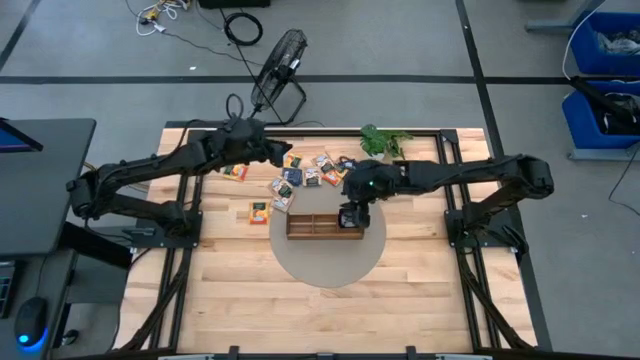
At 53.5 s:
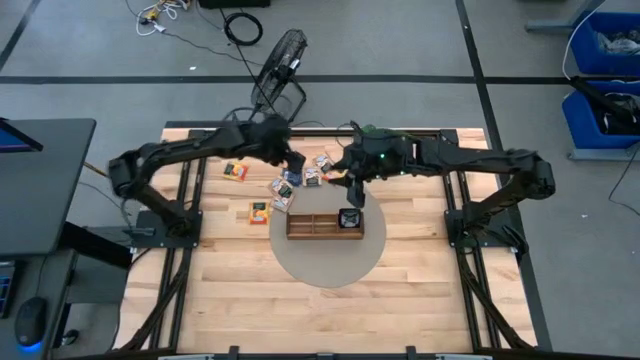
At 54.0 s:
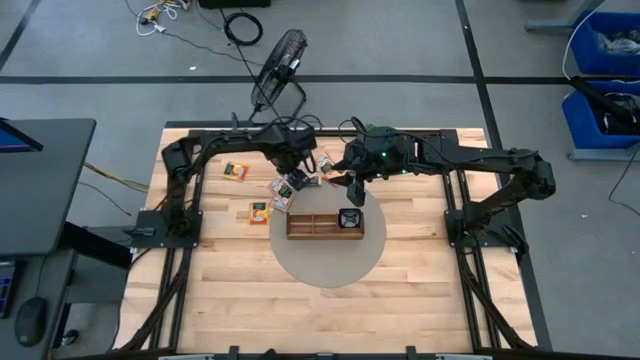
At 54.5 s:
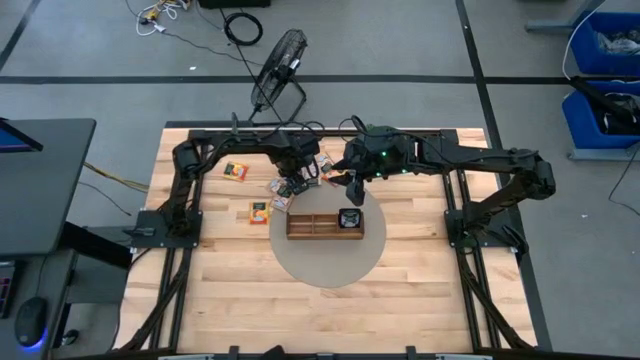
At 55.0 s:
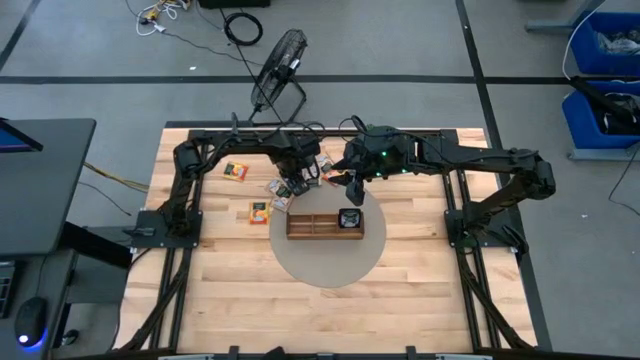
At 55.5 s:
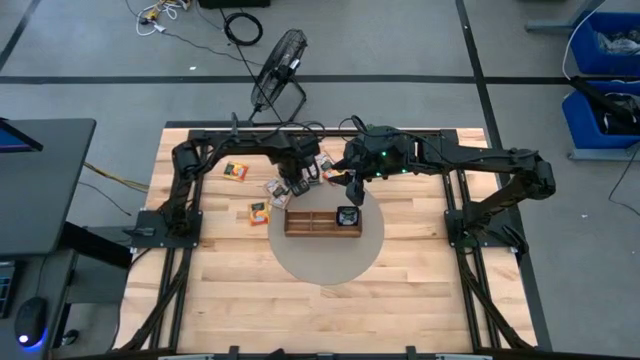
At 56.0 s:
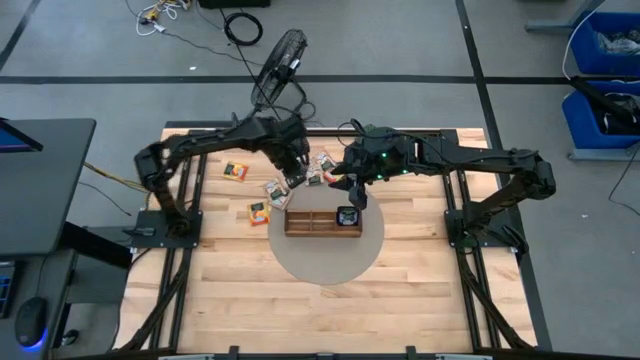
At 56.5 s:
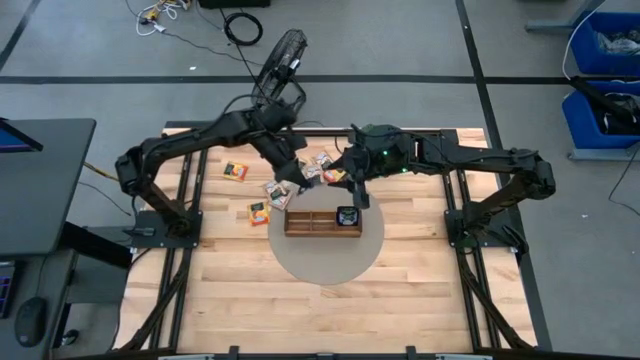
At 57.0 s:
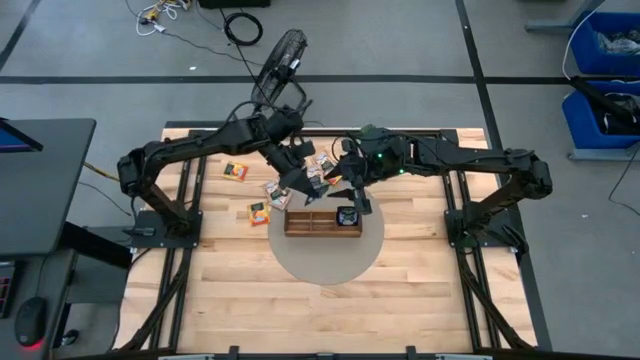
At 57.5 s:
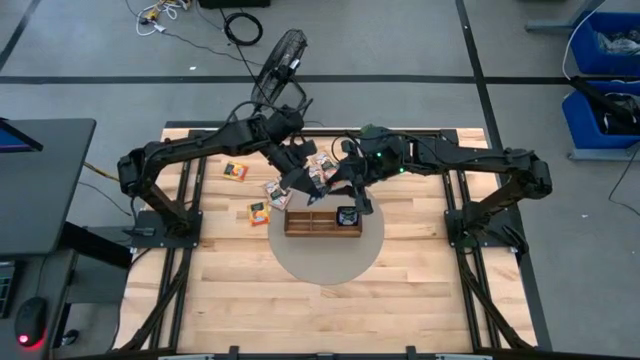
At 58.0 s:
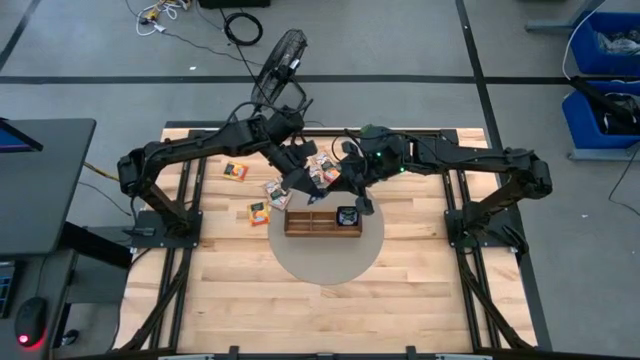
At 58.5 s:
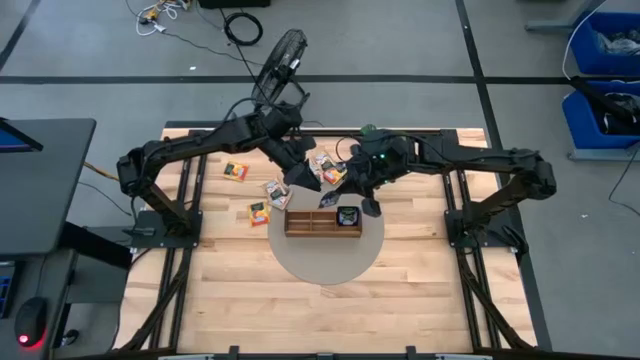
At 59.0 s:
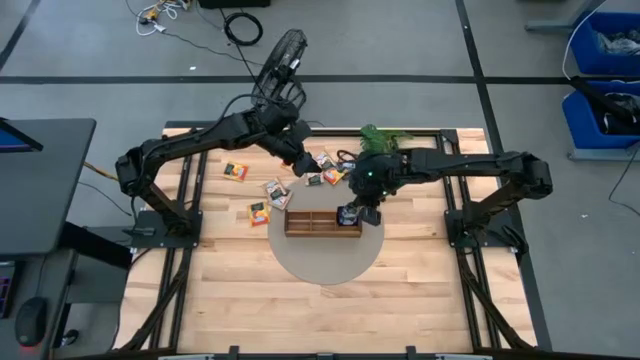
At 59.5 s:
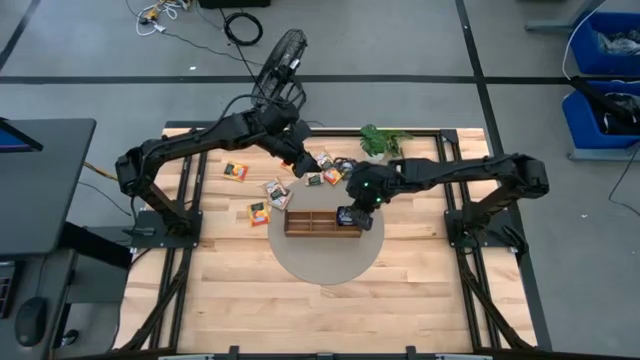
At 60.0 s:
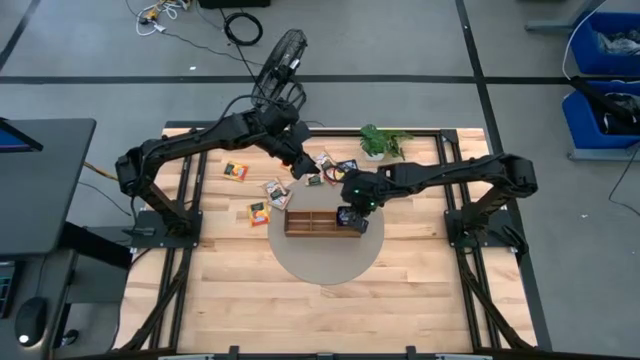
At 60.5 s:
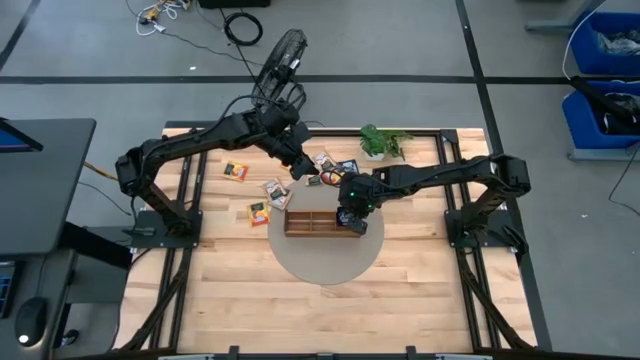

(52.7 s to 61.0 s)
Task: Pick & Place Tea
Put the blue tea bag into the right section of the wooden organizer

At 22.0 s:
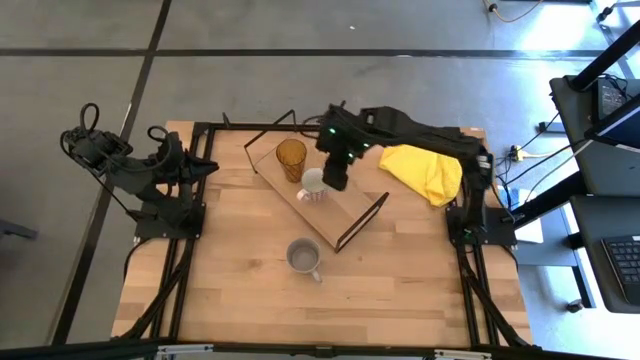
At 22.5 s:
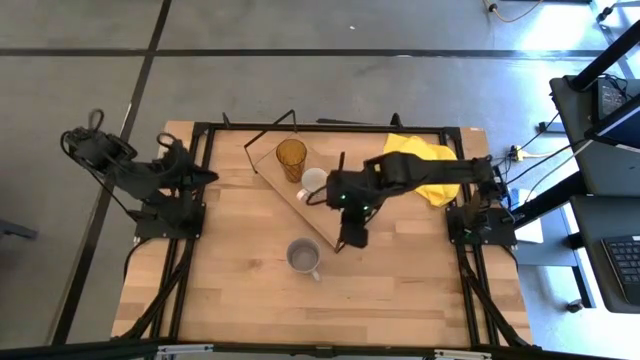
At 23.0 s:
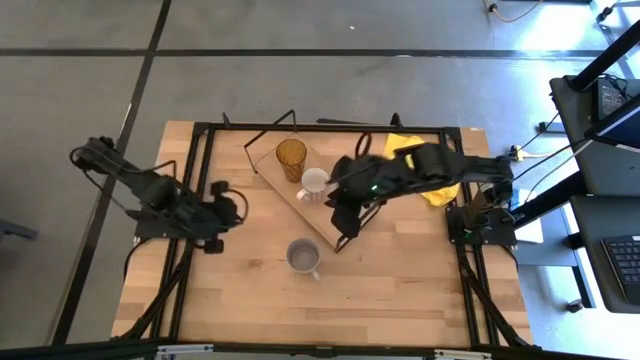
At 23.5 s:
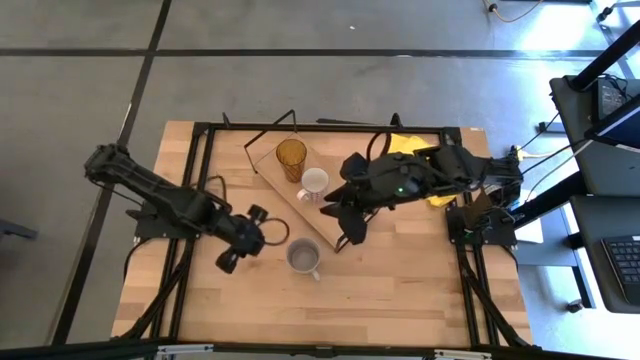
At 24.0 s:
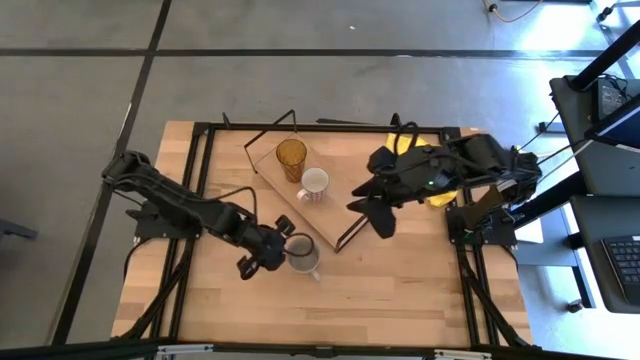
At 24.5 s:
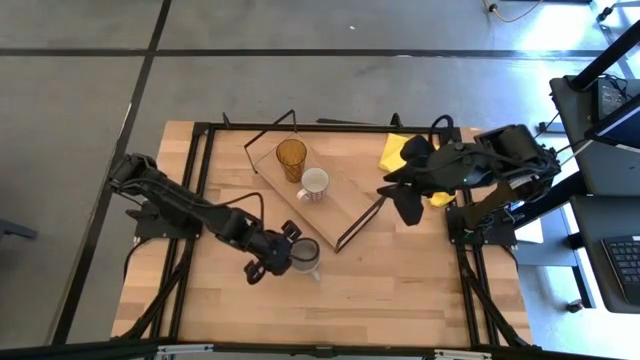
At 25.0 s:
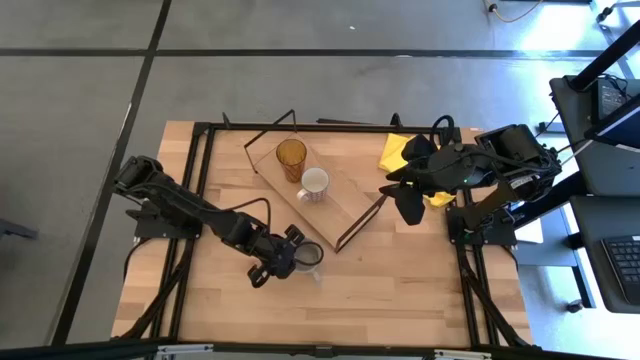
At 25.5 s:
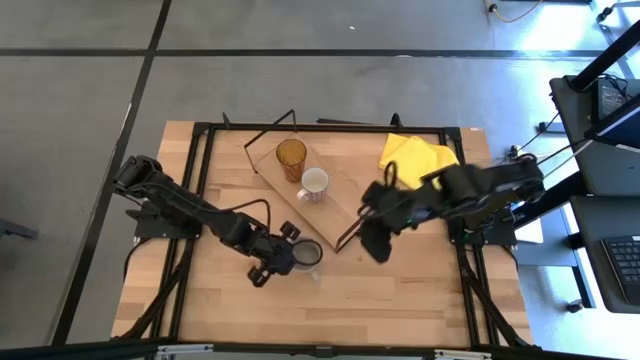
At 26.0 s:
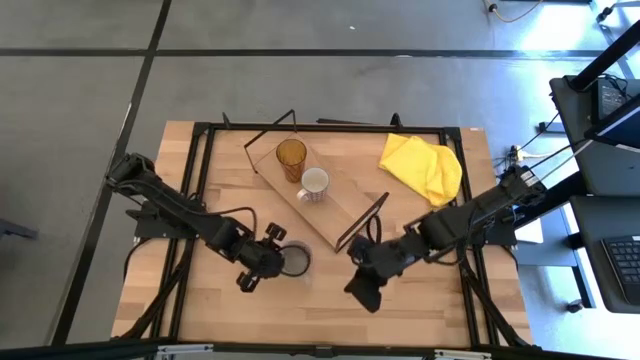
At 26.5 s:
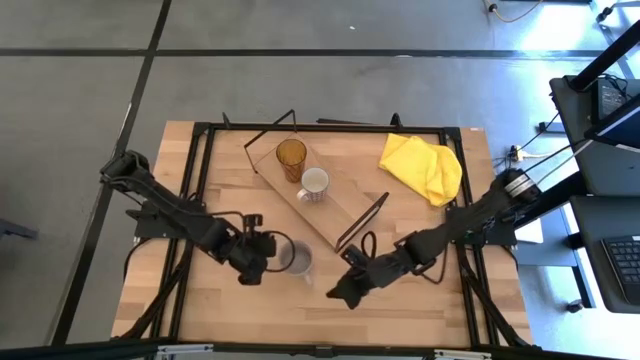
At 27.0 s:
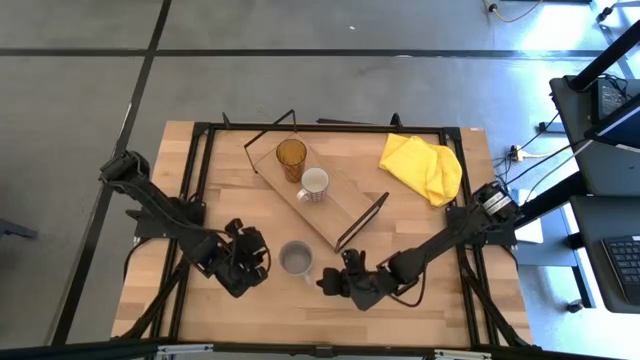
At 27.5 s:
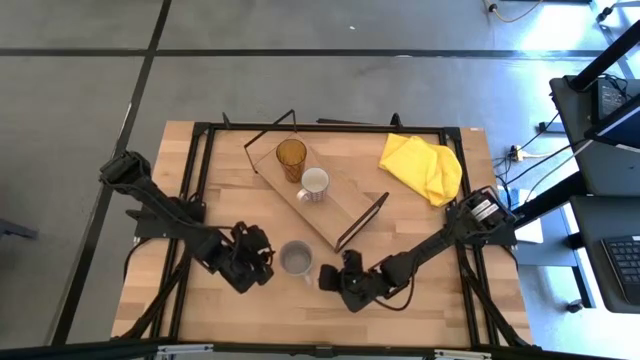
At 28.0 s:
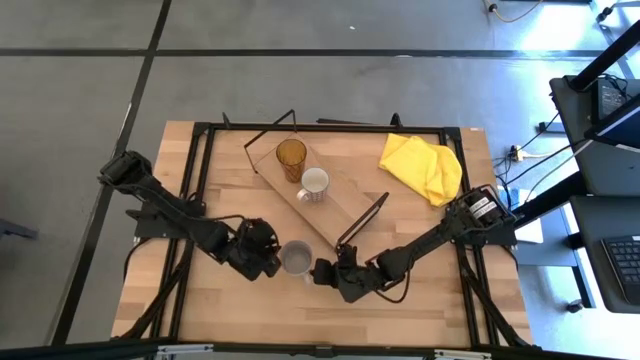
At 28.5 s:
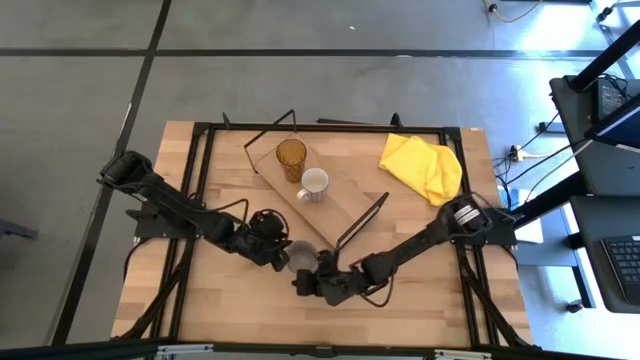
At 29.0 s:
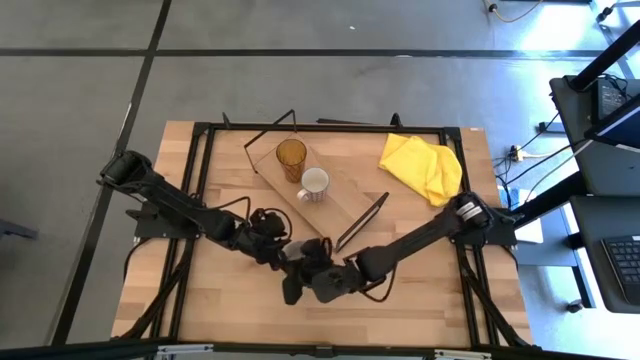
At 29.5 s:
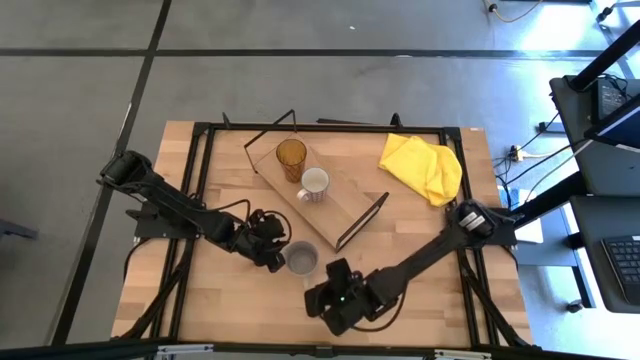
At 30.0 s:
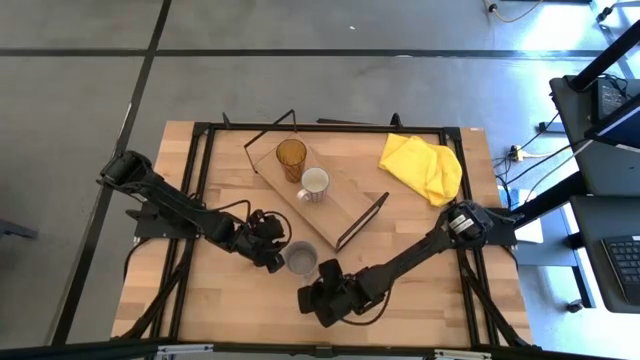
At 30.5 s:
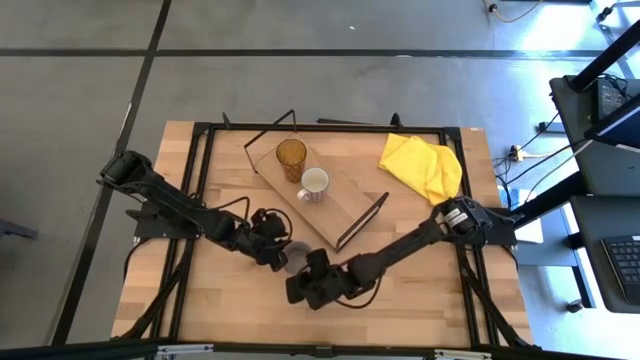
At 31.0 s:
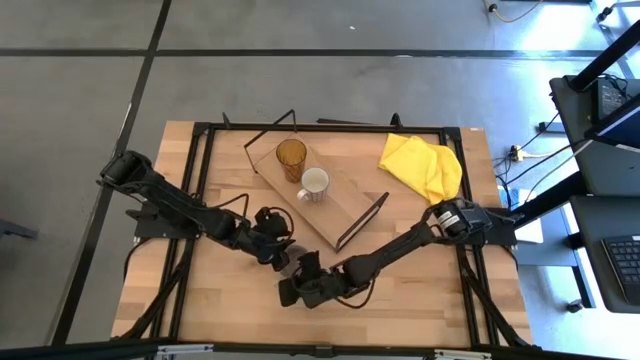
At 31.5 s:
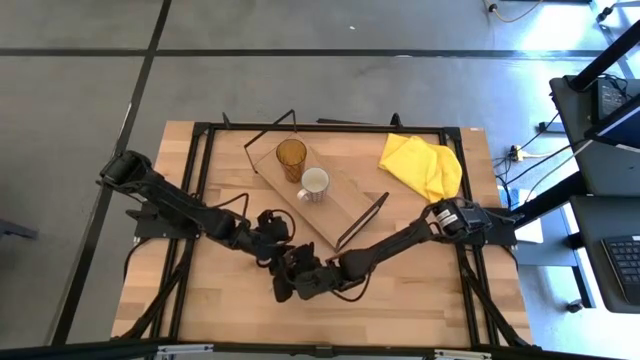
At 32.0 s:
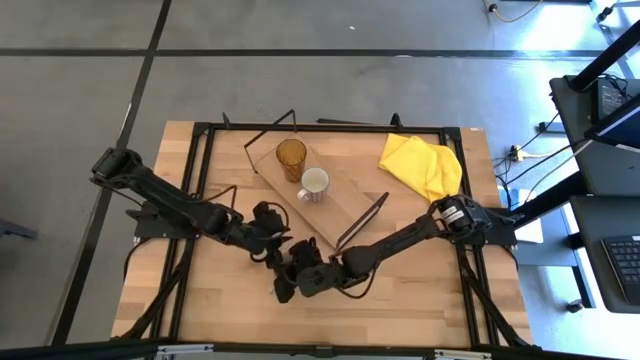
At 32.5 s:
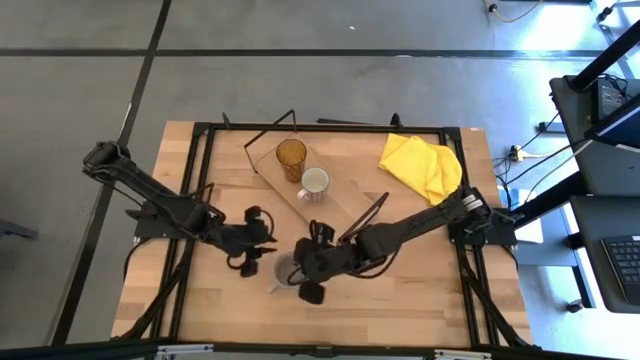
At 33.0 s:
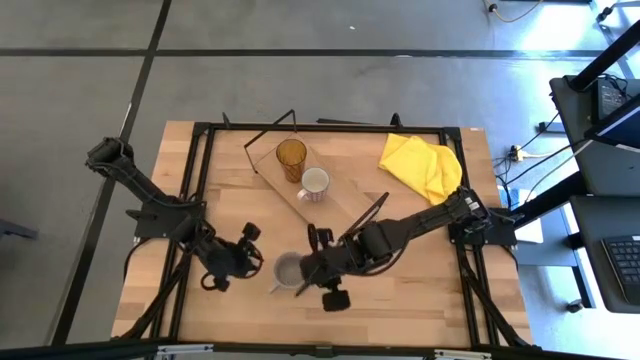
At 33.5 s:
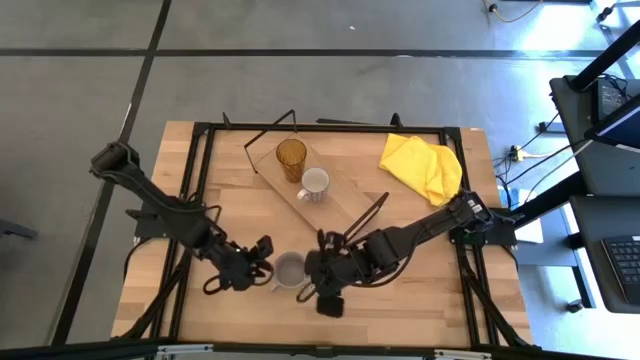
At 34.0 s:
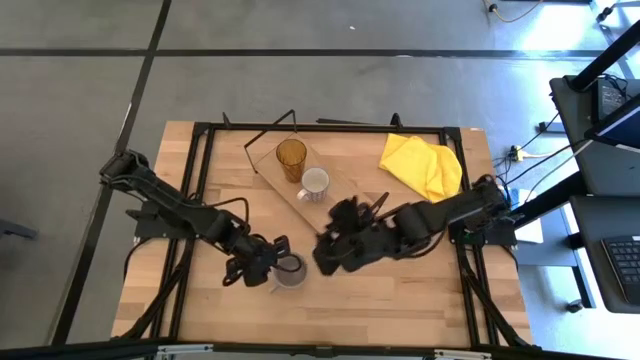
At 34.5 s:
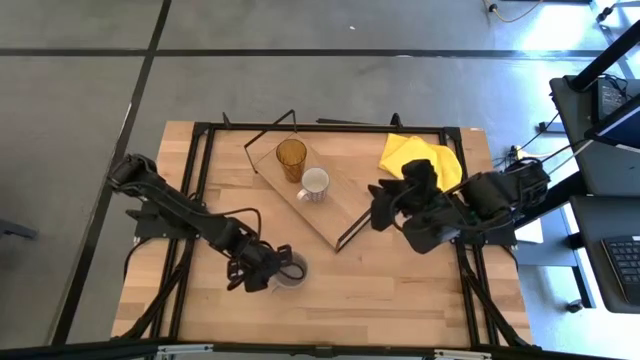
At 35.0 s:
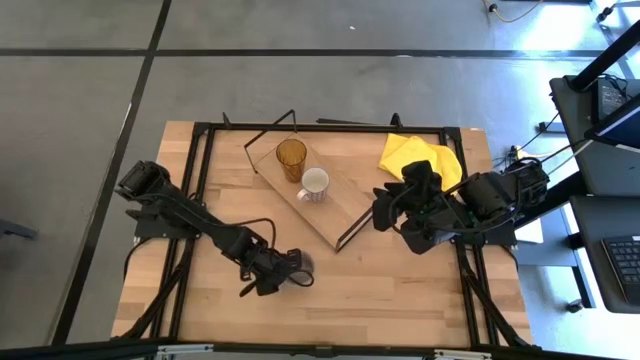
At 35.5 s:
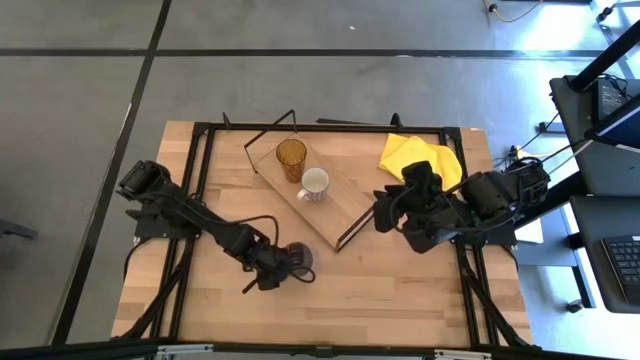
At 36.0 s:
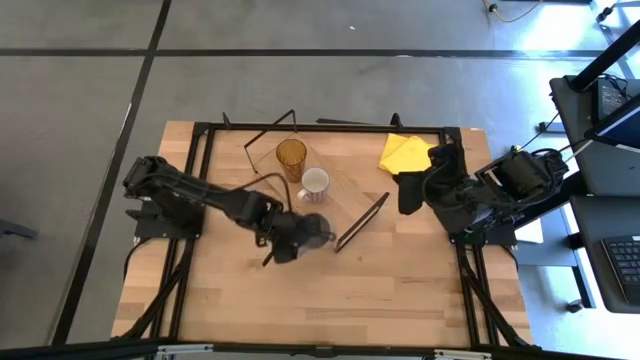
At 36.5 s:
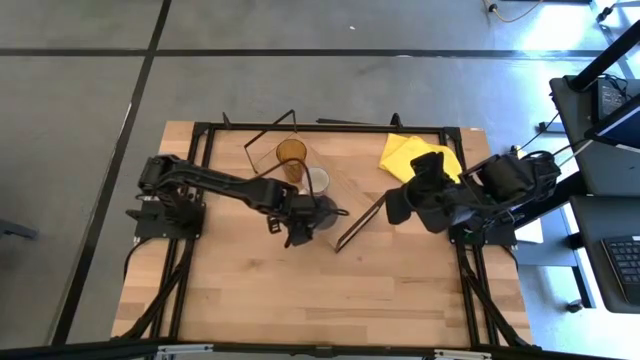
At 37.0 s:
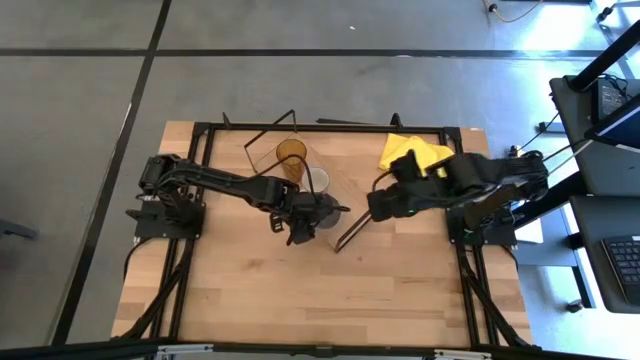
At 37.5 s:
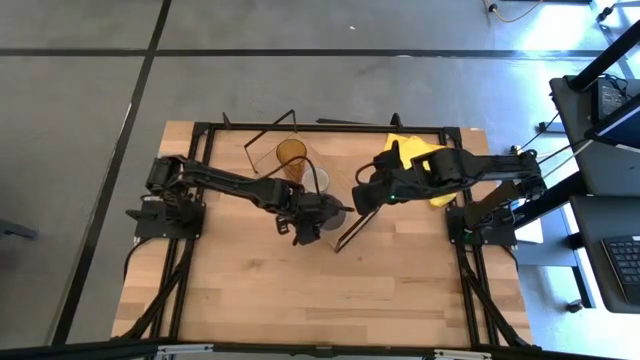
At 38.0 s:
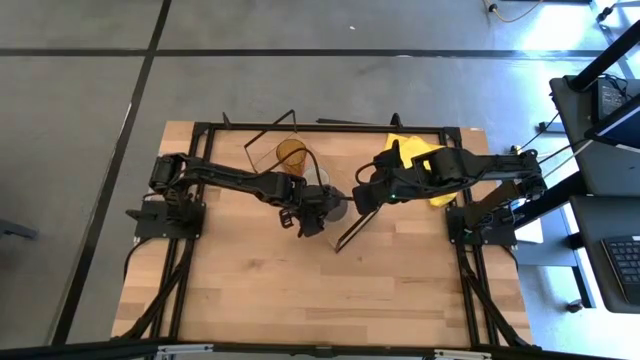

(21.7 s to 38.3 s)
Task: Stack small to large cups/mugs on shelf
Put the grey patterned mug on the shelf
